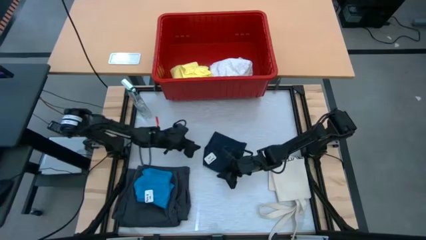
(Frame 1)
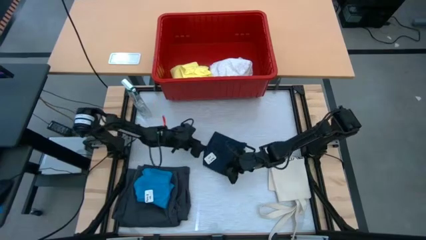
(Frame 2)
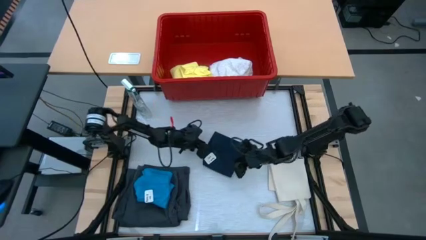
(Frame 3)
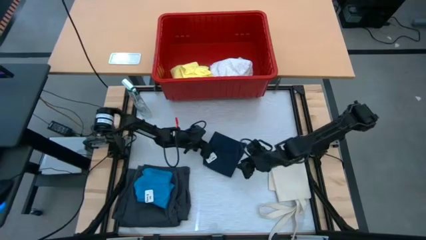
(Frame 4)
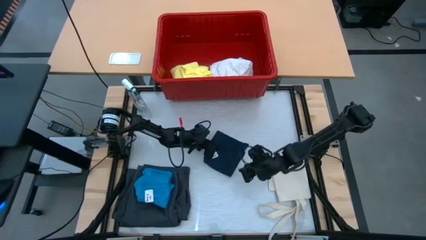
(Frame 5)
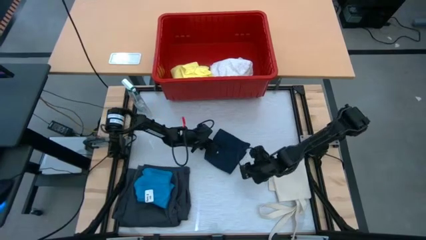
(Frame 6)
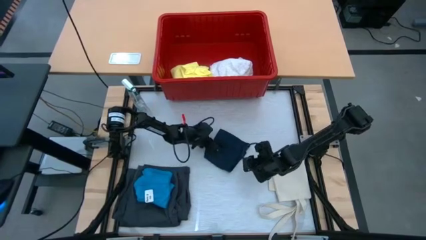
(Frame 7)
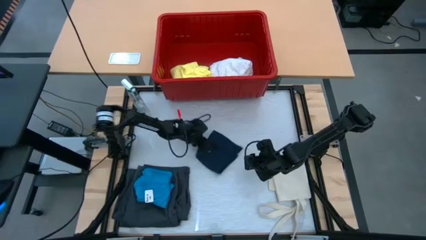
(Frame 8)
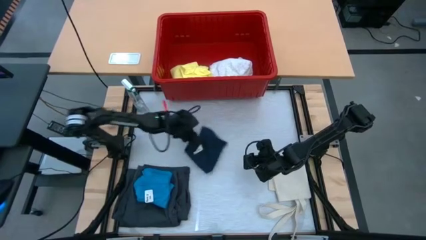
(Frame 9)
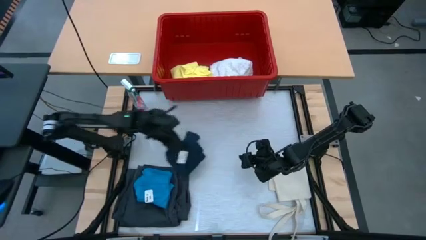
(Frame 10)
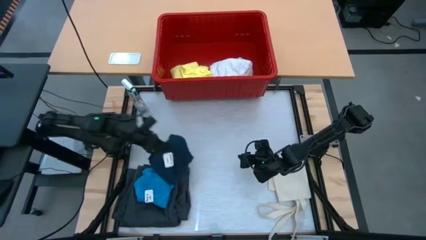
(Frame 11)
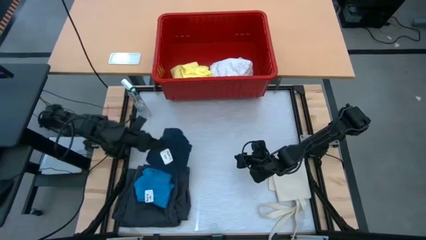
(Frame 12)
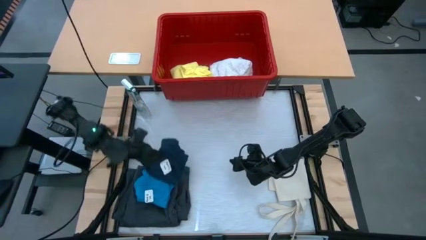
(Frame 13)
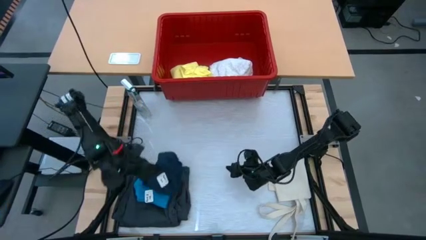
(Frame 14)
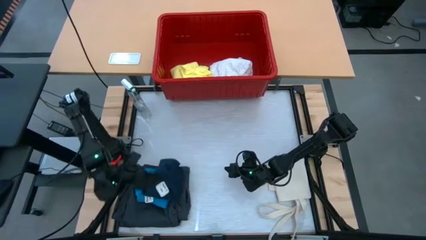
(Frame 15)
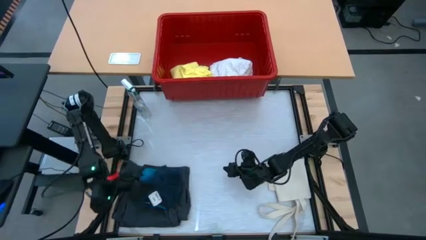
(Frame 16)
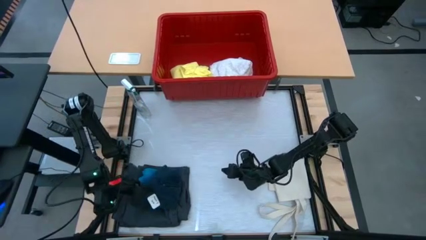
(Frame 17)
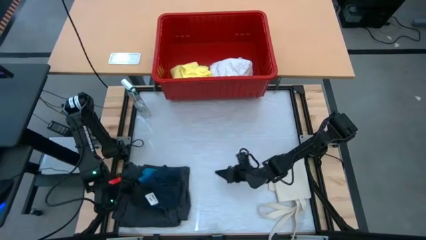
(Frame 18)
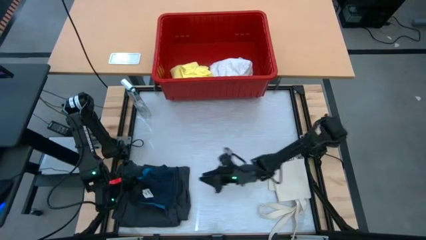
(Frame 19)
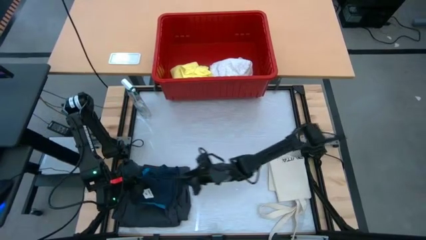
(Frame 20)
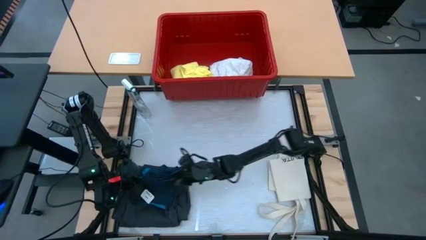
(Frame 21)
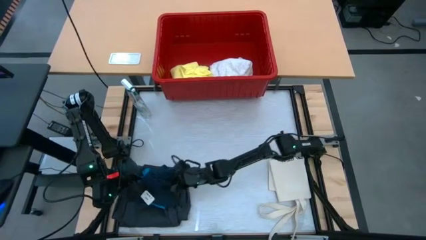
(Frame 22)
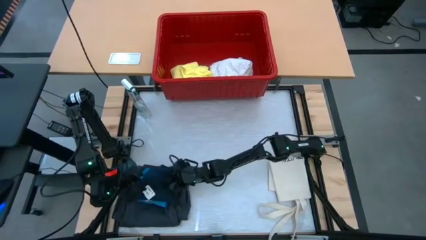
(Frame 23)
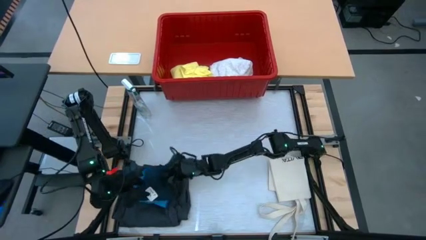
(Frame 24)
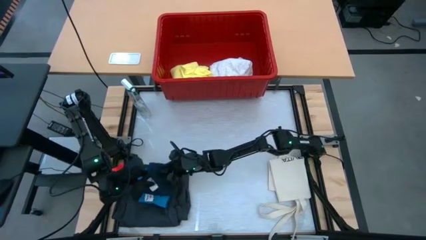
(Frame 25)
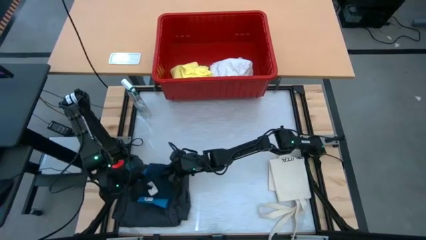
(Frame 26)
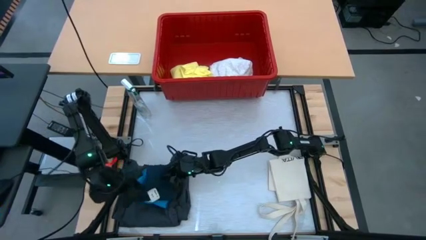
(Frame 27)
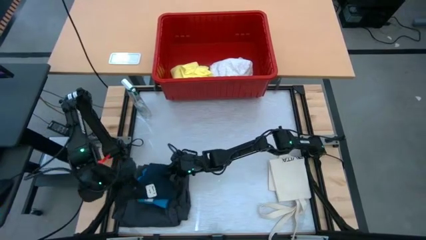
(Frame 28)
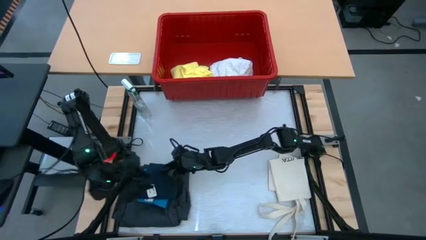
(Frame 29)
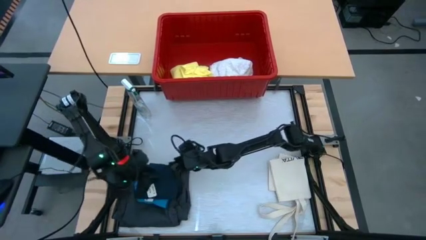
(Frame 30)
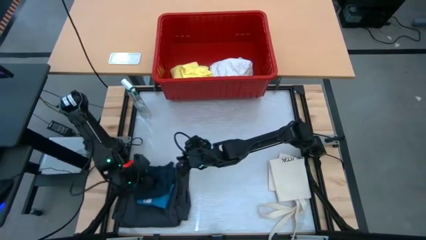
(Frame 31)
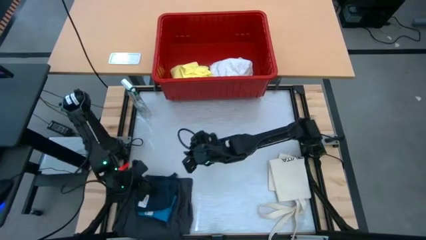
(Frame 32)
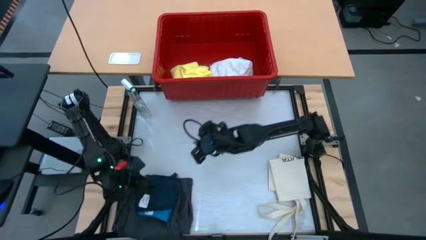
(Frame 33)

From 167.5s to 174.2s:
Task: Fold laundry
Stack the black shorts on top of the stacked shorts

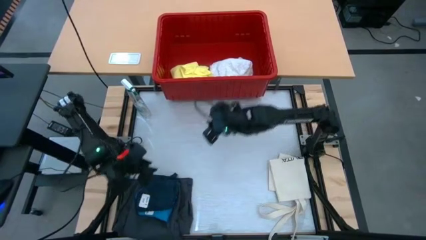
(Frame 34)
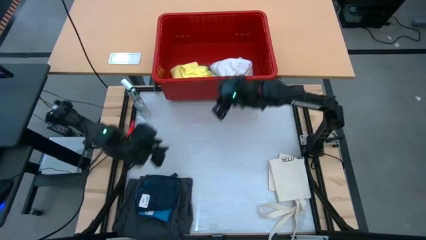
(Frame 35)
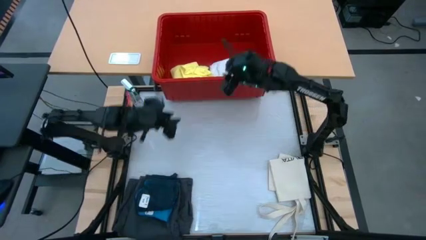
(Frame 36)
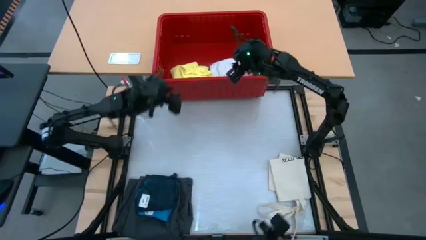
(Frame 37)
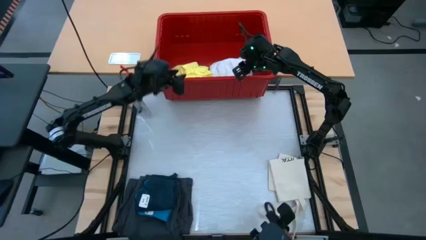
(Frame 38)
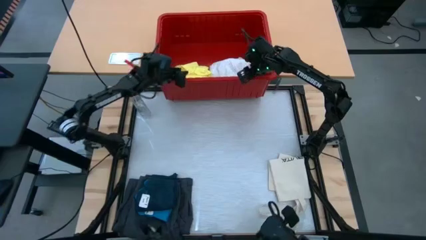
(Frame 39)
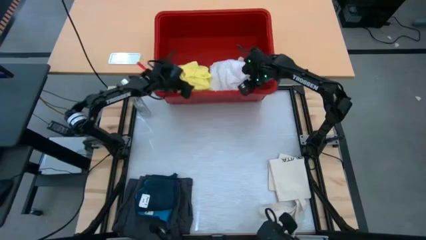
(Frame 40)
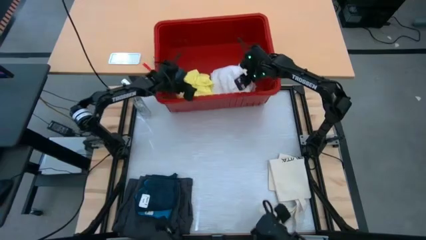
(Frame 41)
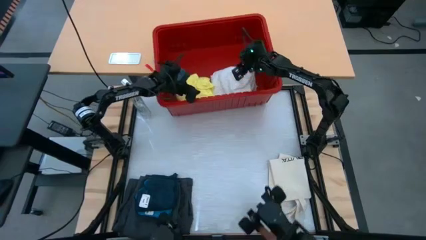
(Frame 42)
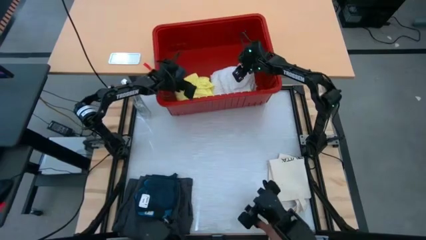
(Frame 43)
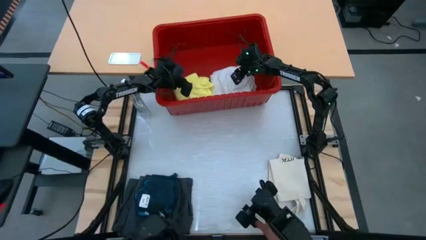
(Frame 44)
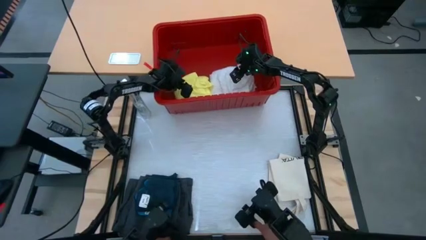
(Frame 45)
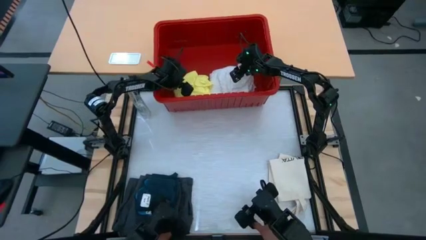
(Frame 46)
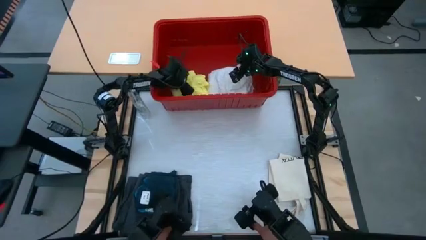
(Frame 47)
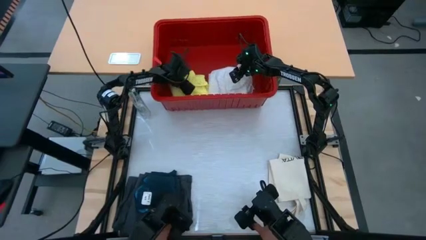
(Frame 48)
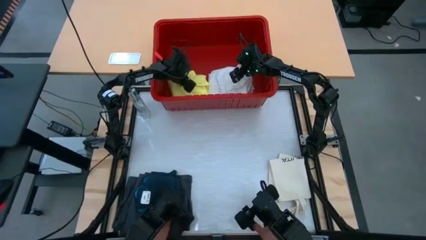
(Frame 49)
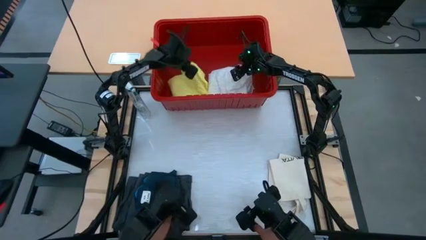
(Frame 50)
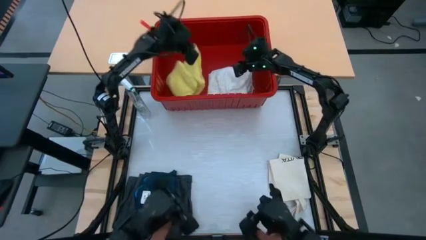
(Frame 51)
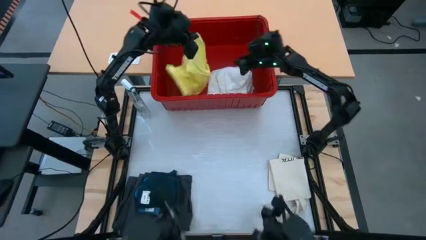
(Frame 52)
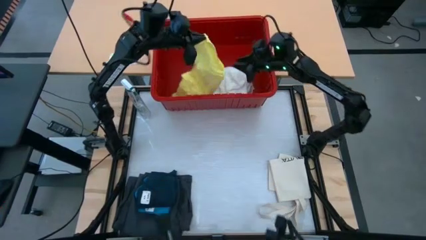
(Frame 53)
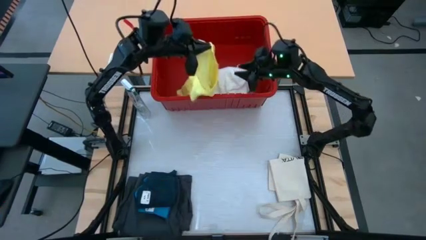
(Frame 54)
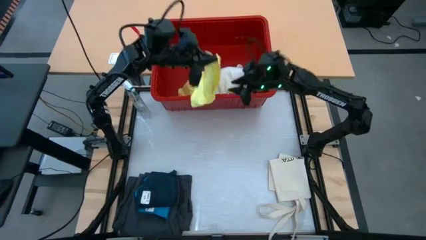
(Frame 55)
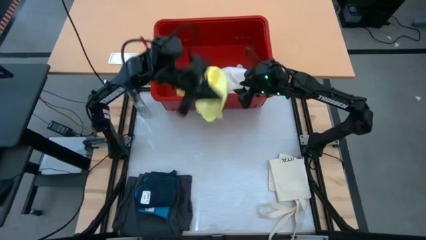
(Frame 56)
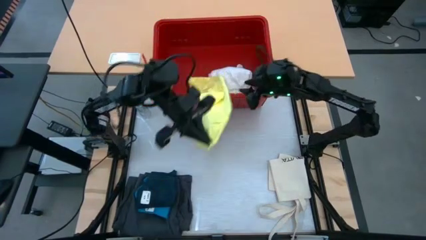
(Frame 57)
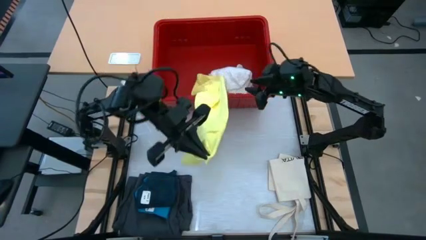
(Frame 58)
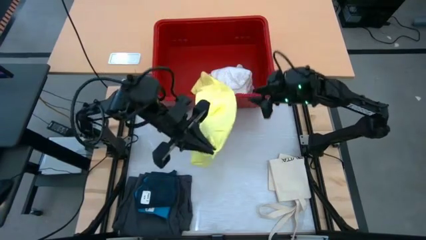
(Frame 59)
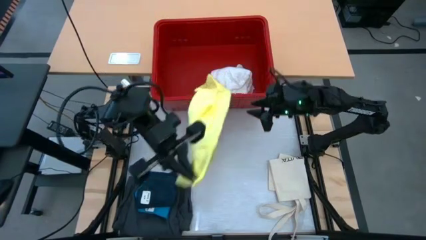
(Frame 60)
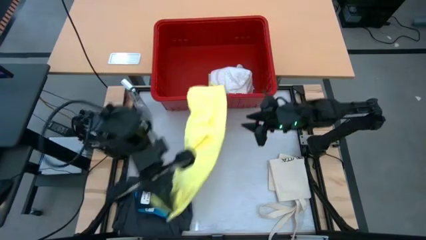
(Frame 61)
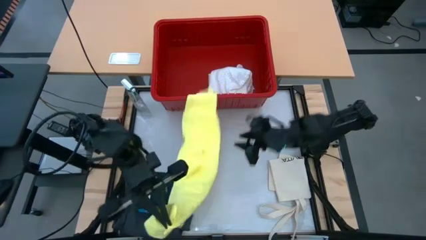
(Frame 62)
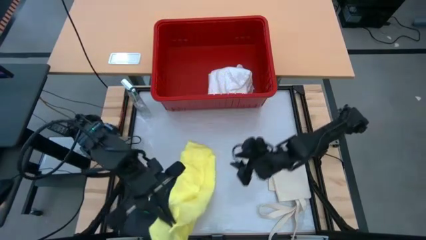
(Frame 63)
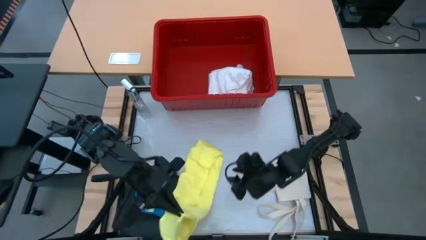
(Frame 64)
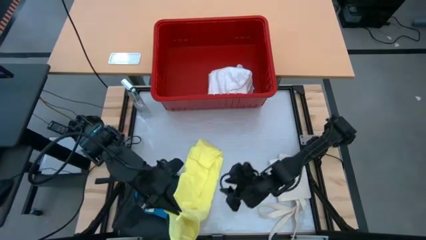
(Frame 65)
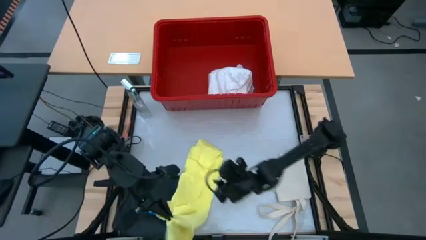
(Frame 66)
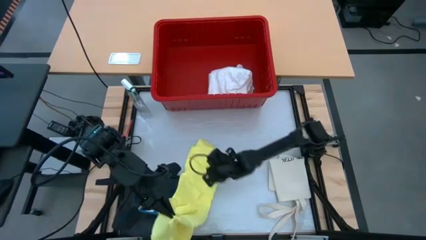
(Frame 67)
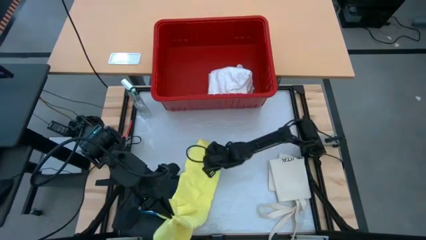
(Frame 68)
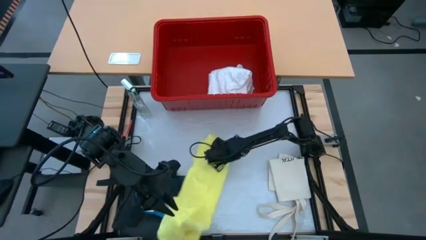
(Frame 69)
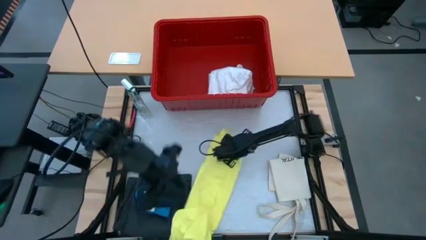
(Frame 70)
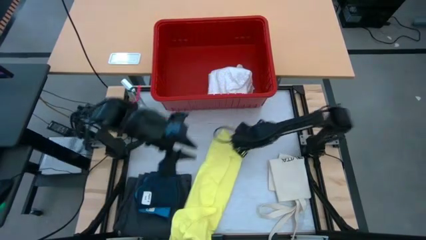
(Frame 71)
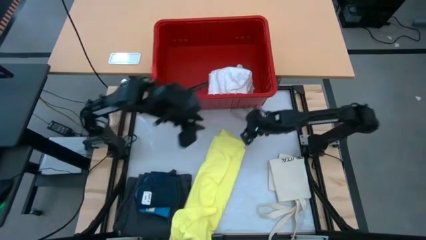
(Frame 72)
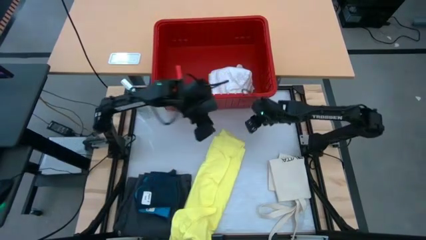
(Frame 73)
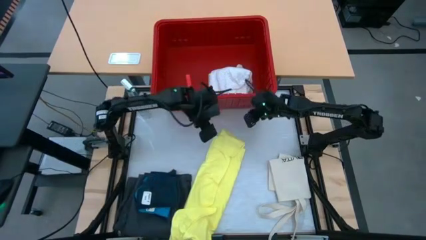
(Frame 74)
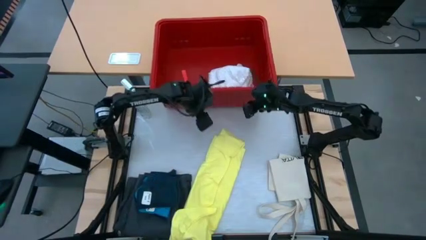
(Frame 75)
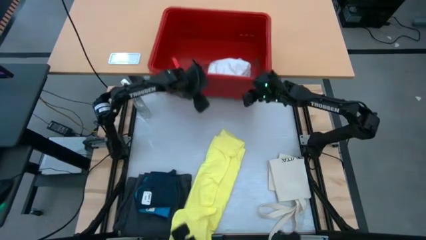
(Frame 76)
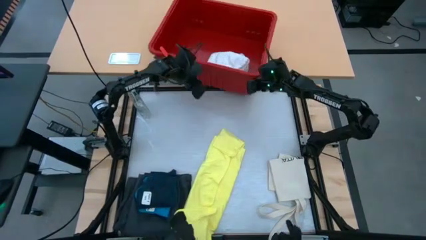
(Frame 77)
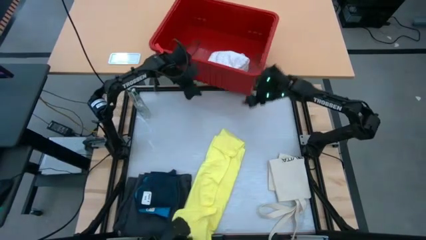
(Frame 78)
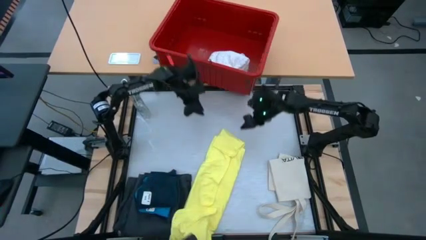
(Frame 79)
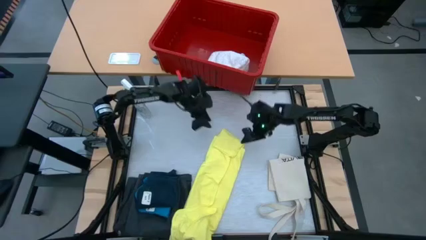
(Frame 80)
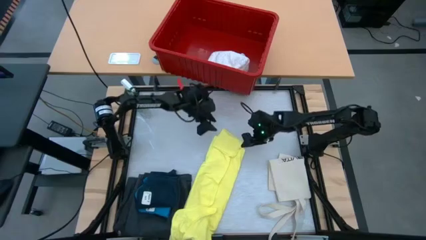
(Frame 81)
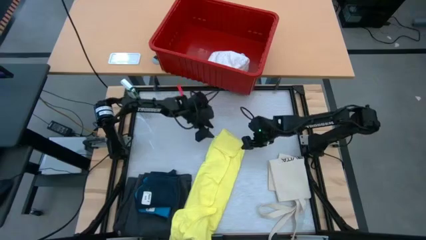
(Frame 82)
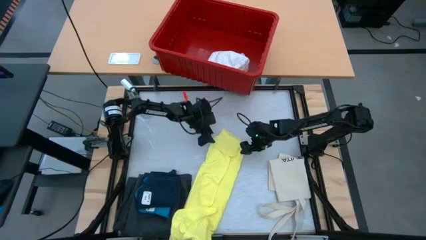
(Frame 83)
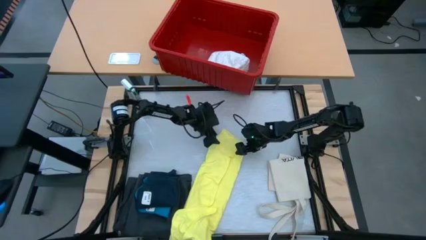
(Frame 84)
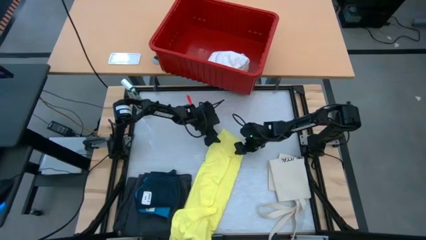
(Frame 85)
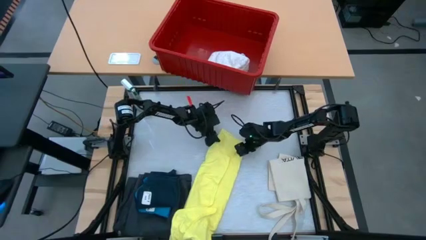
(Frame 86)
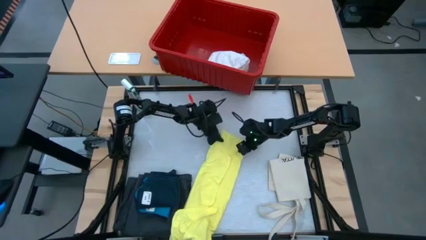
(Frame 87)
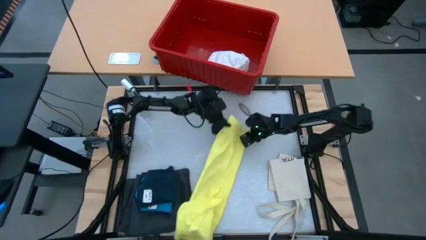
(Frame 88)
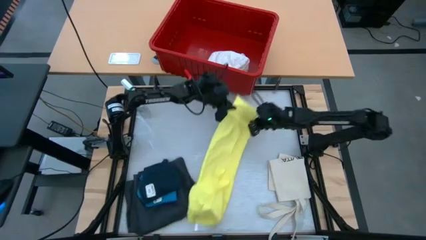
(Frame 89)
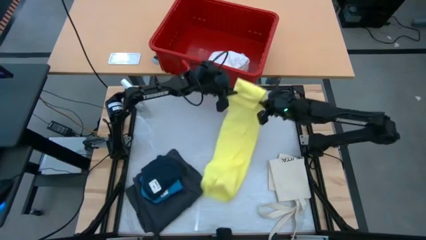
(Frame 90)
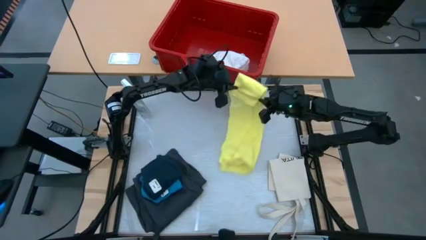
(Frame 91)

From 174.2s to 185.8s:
Fold the yellow shirt
